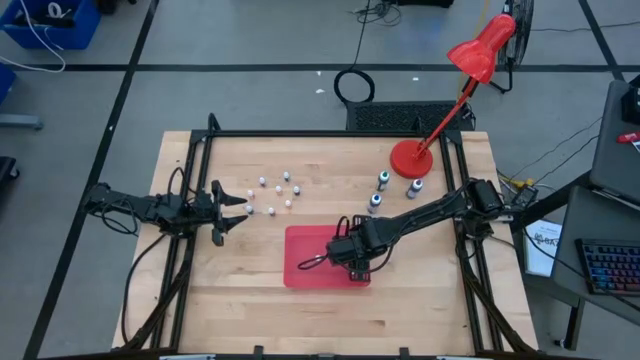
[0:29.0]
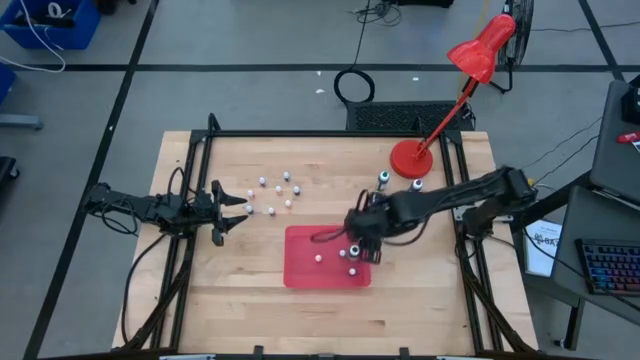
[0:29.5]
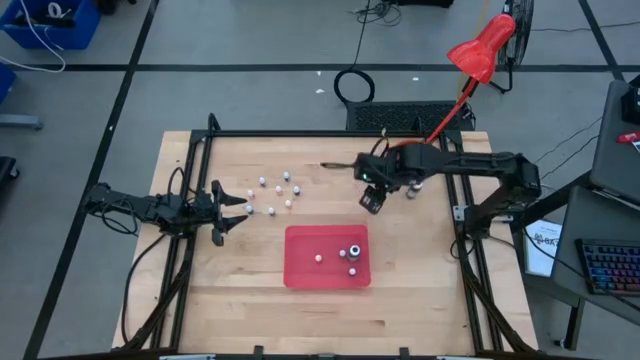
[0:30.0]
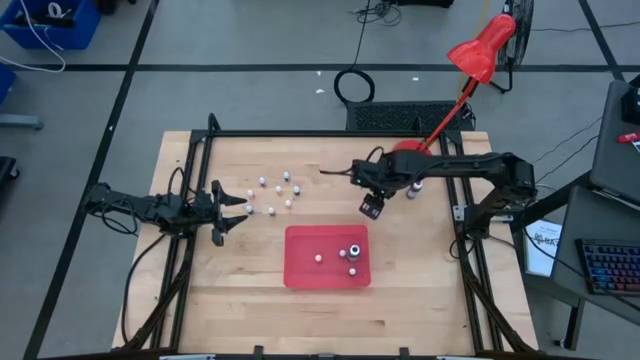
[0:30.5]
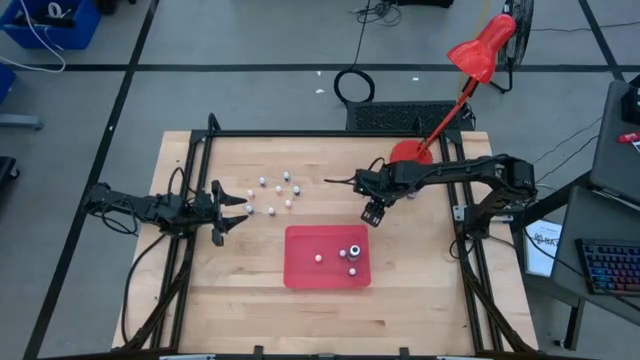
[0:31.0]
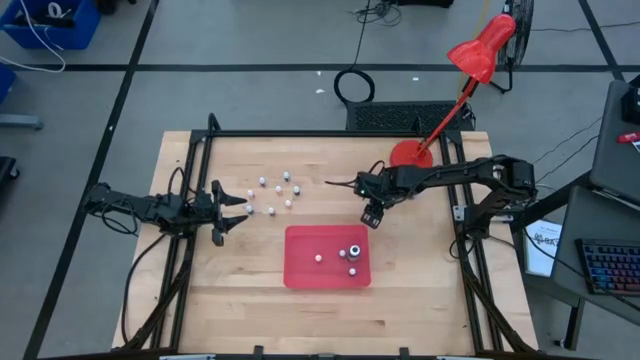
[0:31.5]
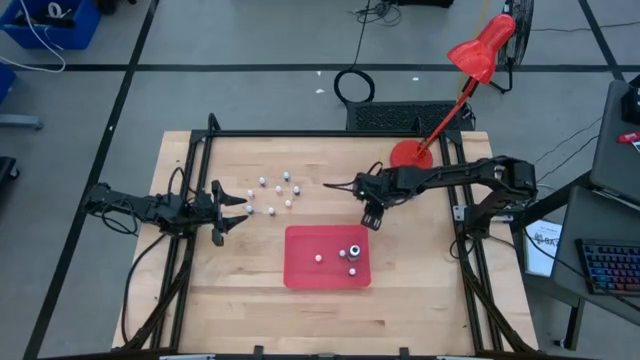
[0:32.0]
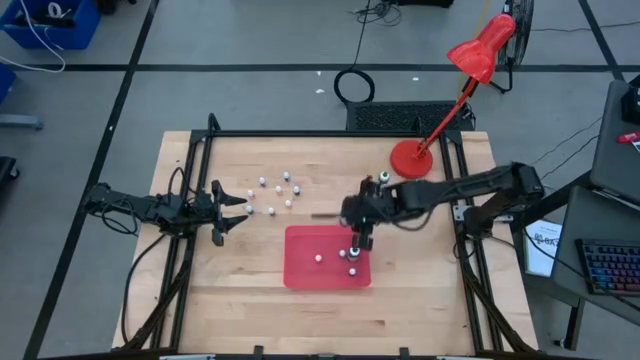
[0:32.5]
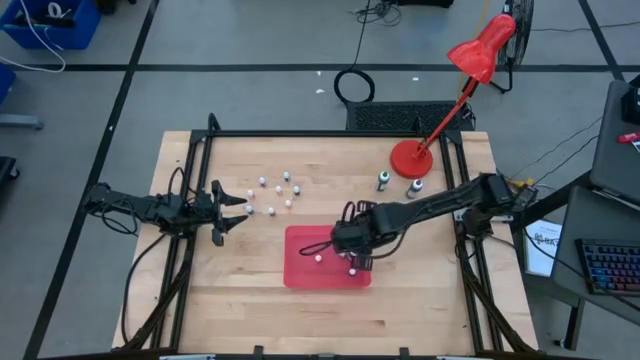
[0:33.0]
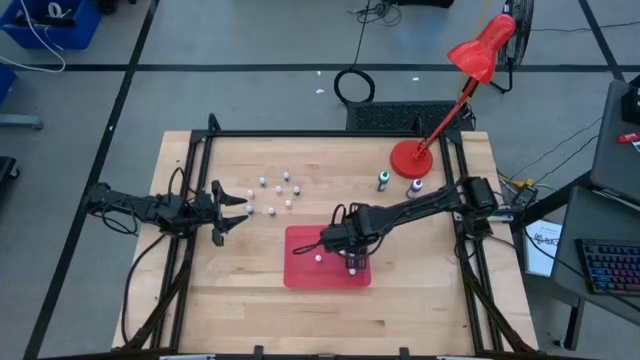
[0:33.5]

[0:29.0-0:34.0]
Task: Pick & Place food coloring
Put the large blue food coloring bottle into the bin

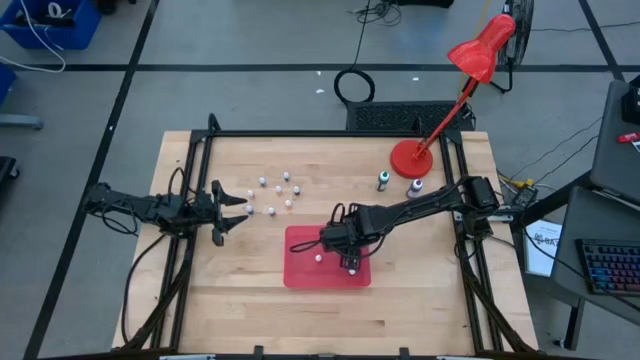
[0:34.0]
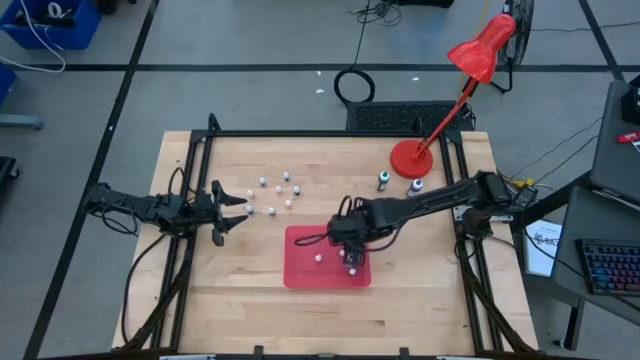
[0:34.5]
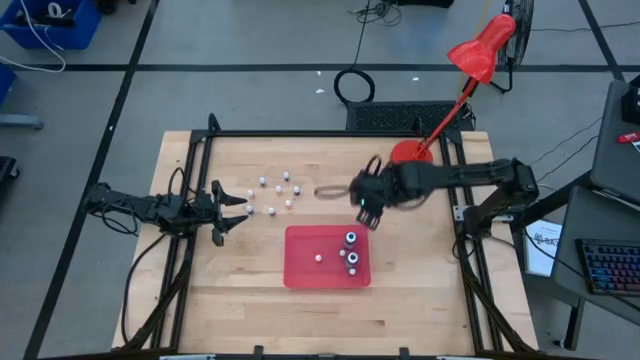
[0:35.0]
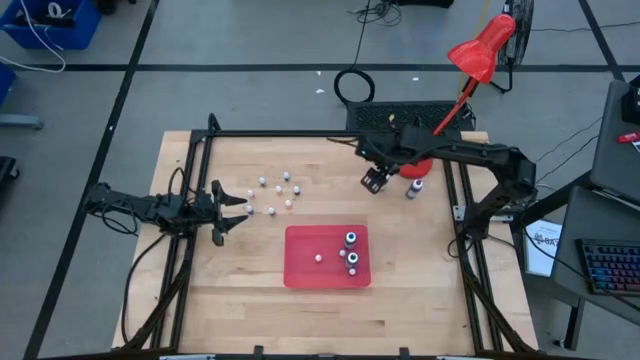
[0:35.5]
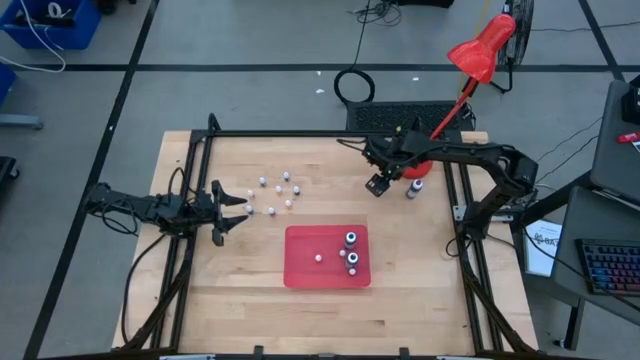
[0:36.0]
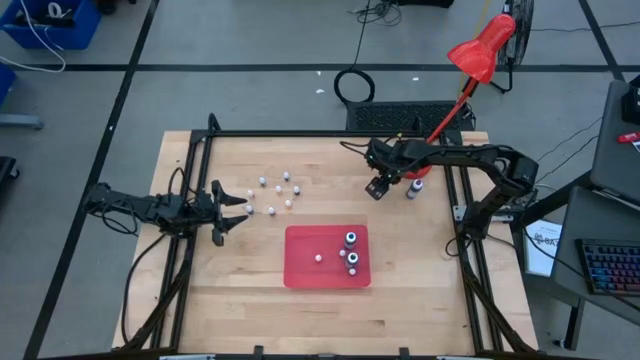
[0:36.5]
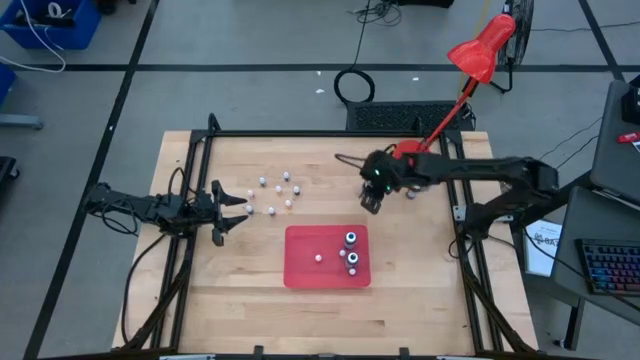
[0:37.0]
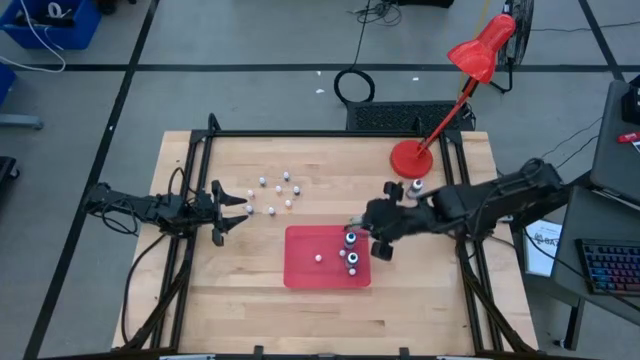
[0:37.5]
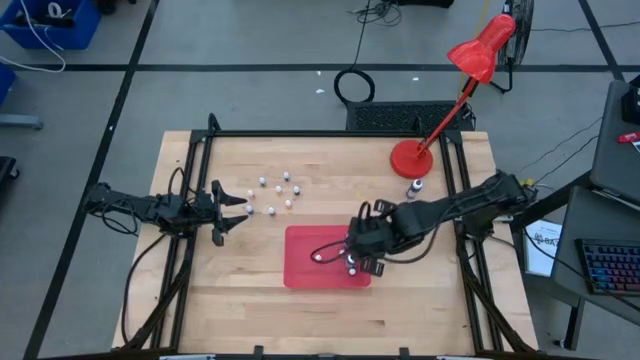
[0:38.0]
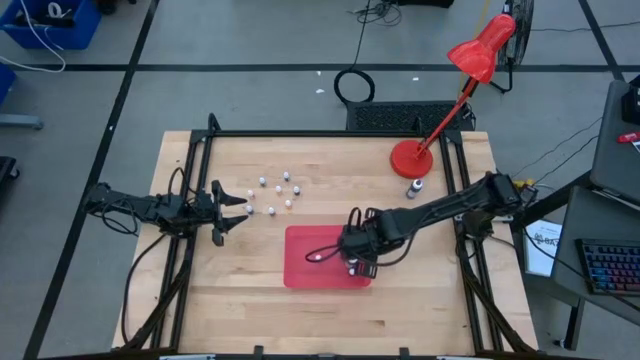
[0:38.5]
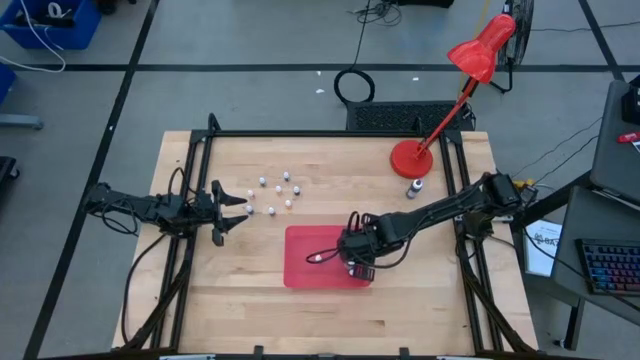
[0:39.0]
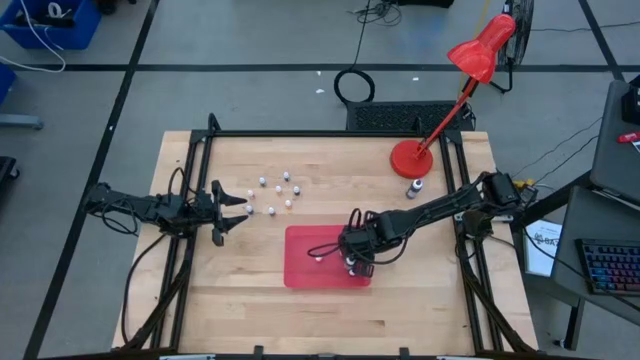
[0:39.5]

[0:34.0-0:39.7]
Put the large green food coloring bottle into the bin

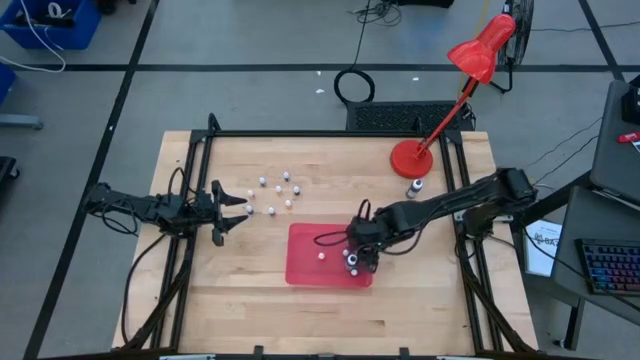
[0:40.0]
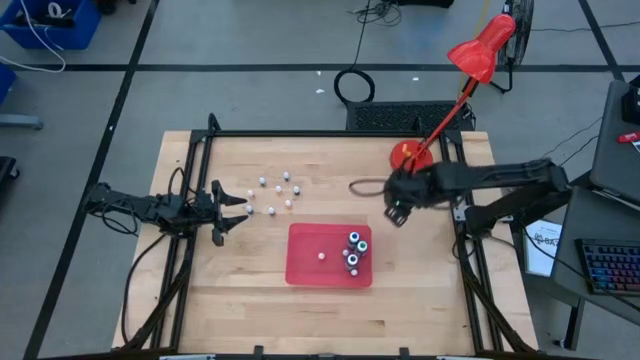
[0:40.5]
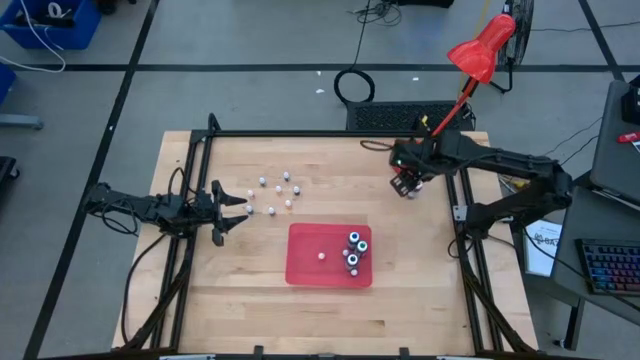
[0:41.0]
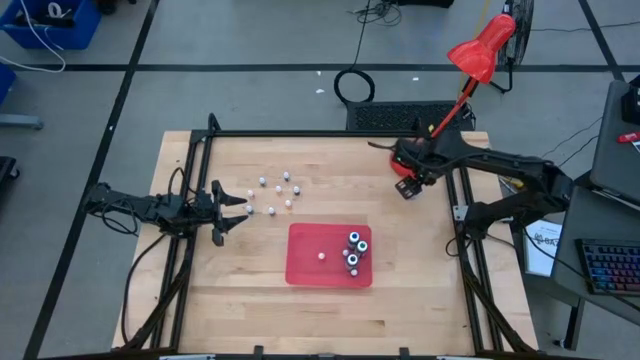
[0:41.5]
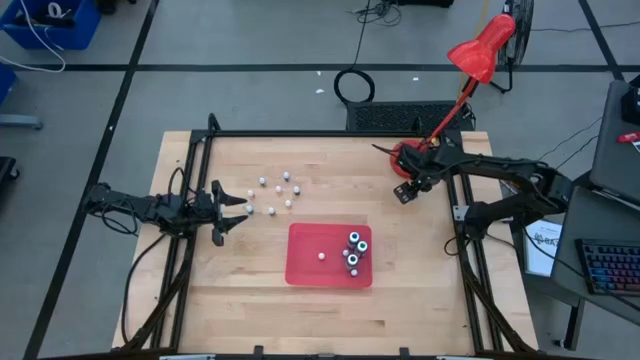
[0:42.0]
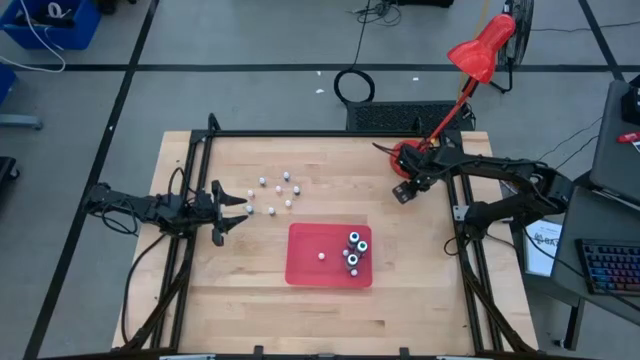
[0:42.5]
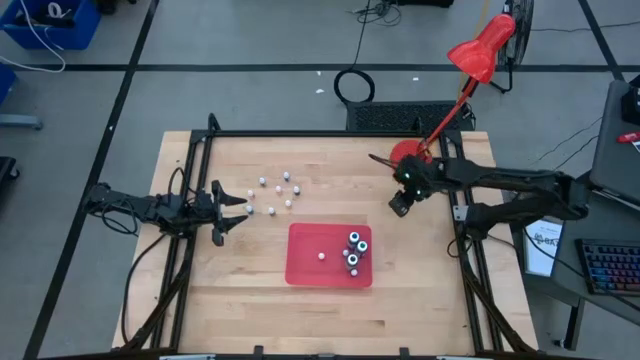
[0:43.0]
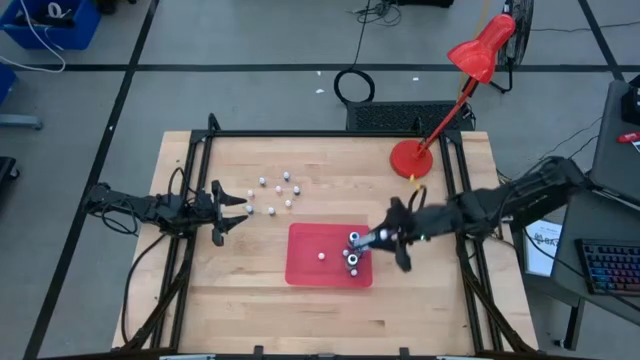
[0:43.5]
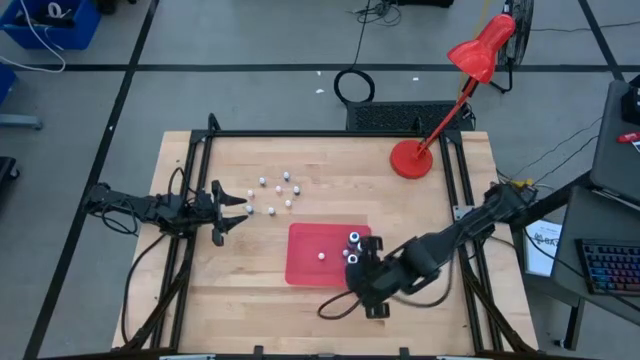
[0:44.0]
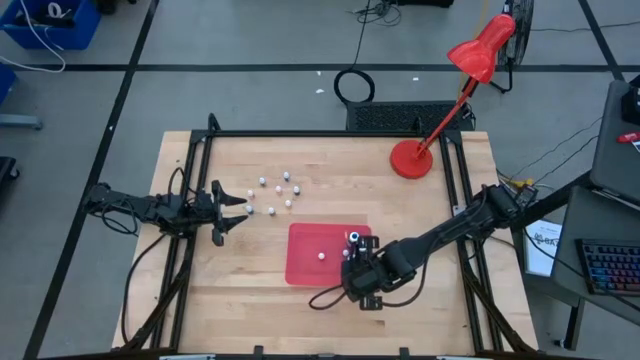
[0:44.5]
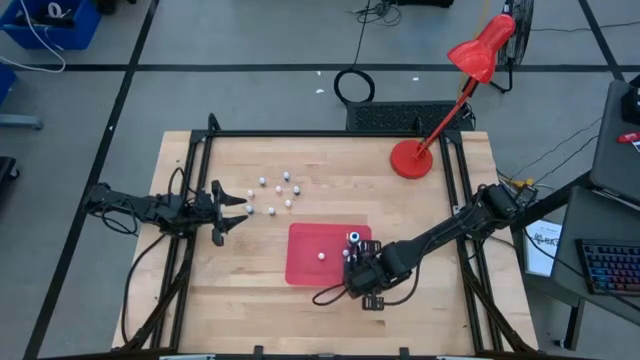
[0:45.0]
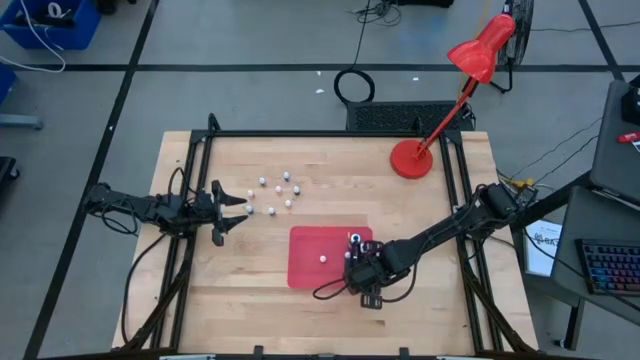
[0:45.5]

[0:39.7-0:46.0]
Put the large violet food coloring bottle into the bin

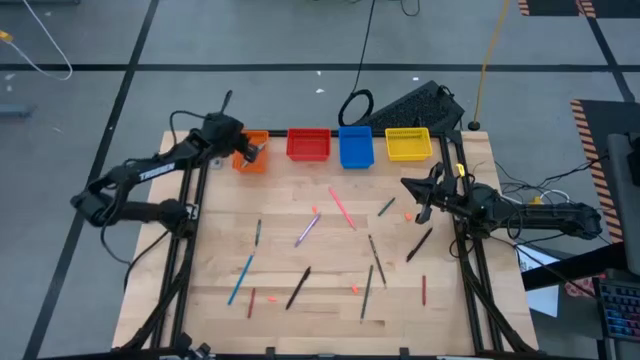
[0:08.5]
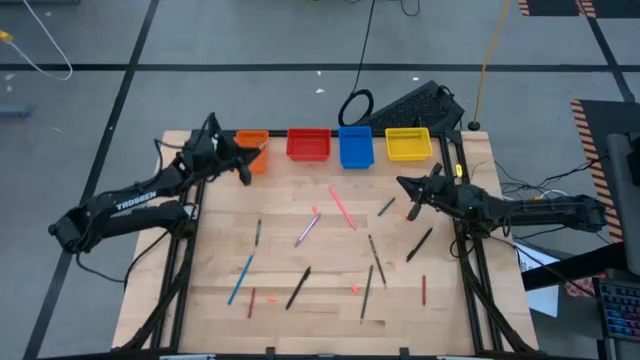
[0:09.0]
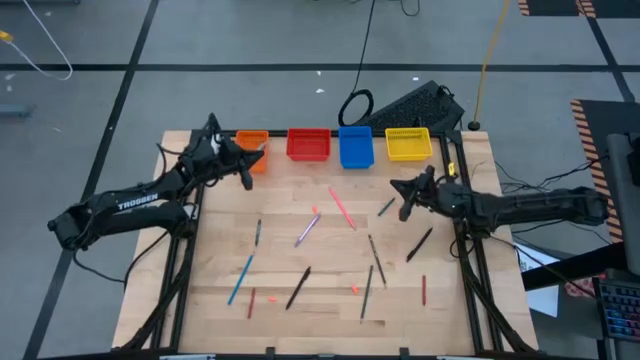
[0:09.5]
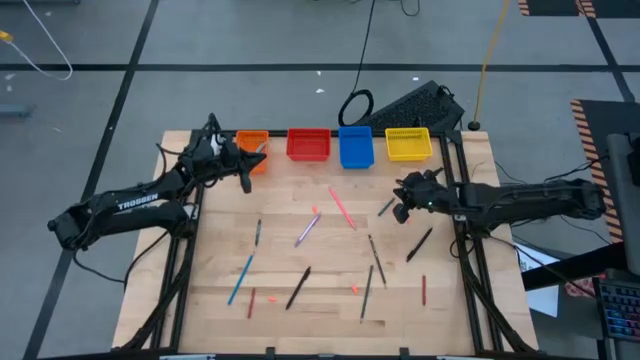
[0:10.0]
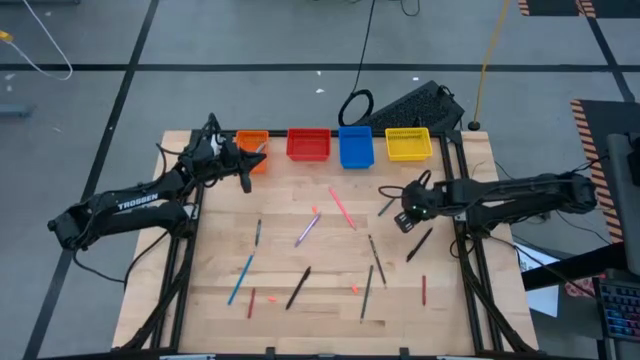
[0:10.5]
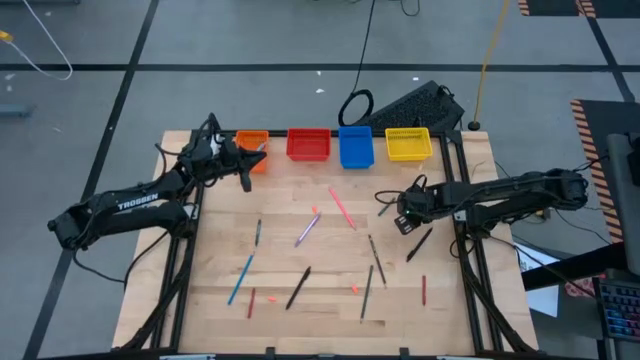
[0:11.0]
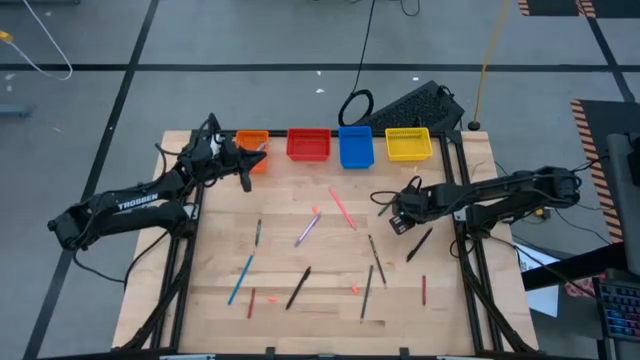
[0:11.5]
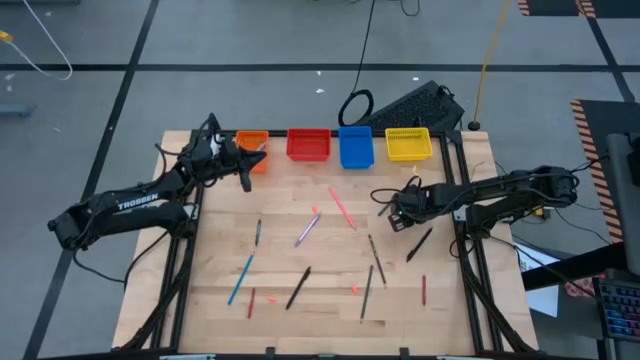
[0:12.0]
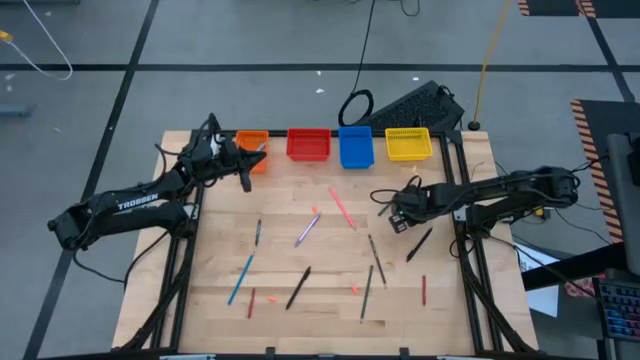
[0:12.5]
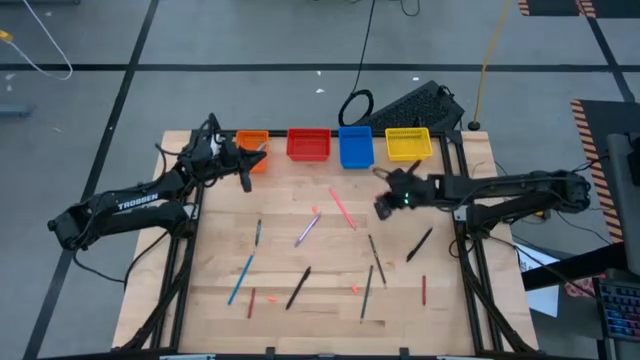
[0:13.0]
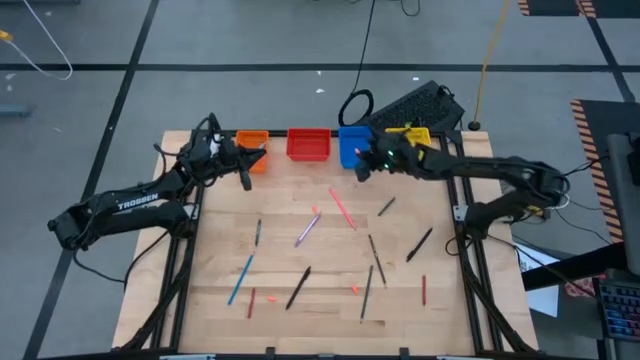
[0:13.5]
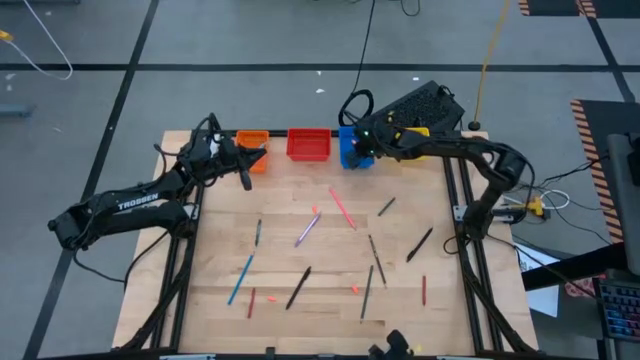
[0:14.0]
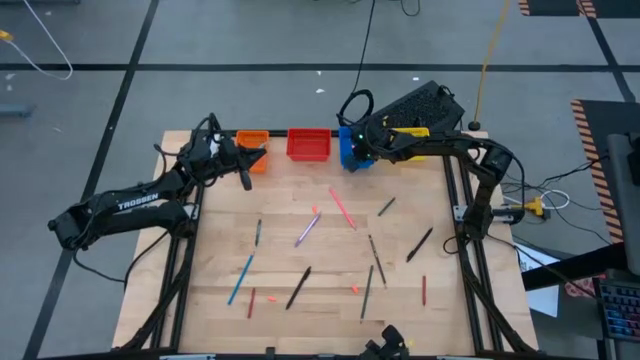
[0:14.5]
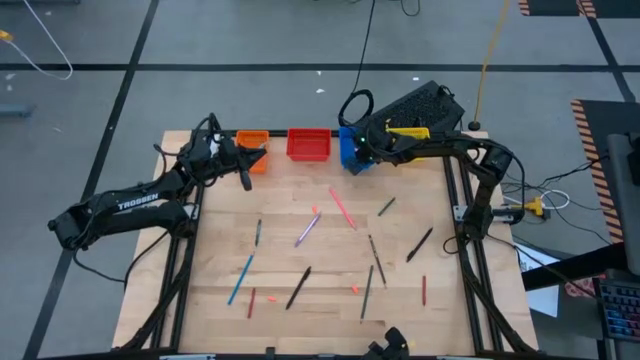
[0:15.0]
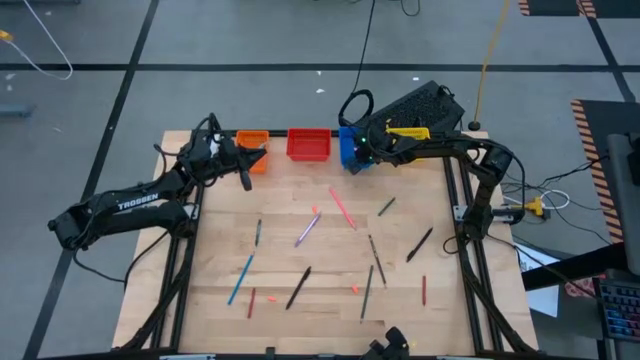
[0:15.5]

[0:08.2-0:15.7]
Task: Sort crayons/erasers/pens/pencils in bins
Put the top right orange pencil eraser into the blue basket
